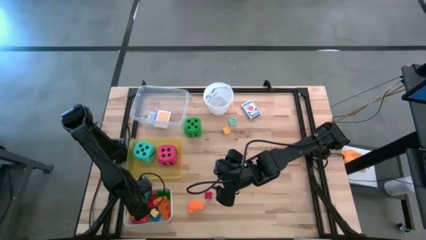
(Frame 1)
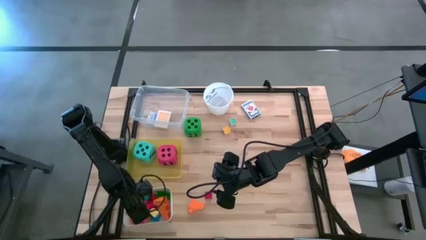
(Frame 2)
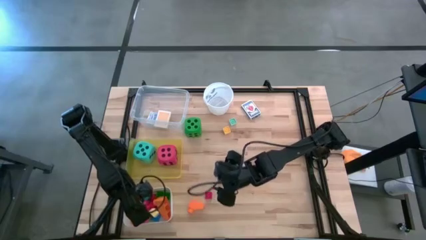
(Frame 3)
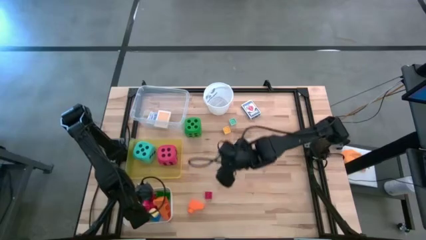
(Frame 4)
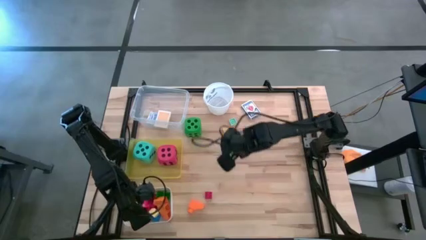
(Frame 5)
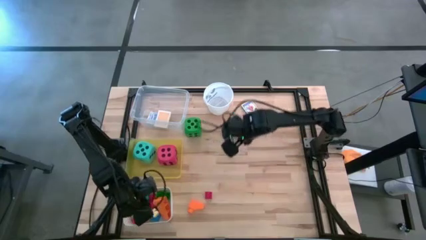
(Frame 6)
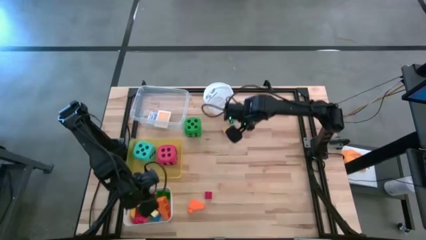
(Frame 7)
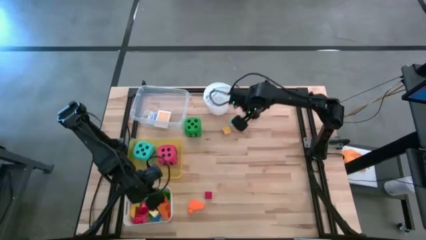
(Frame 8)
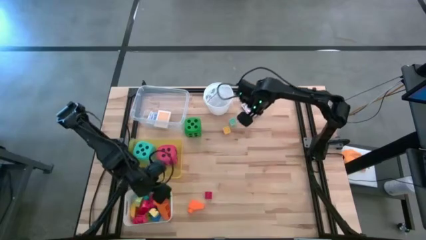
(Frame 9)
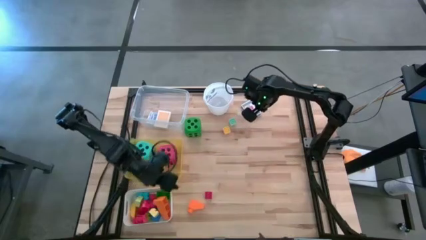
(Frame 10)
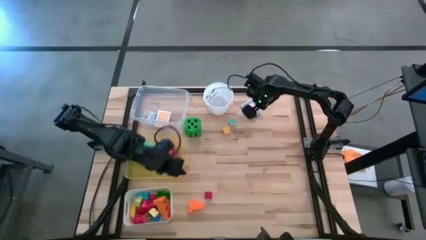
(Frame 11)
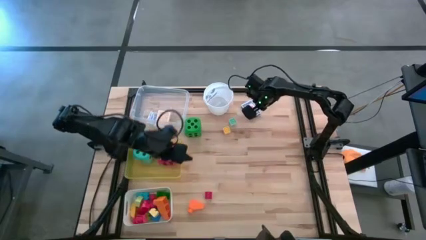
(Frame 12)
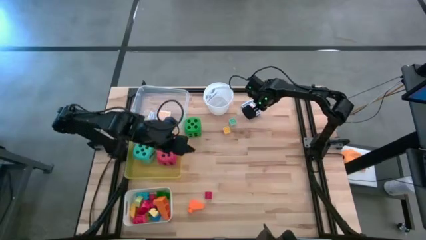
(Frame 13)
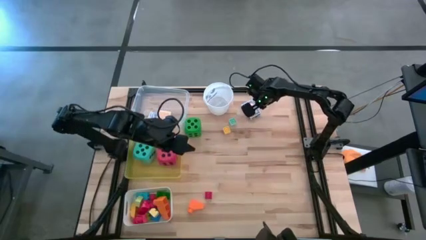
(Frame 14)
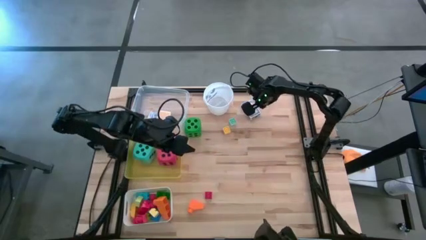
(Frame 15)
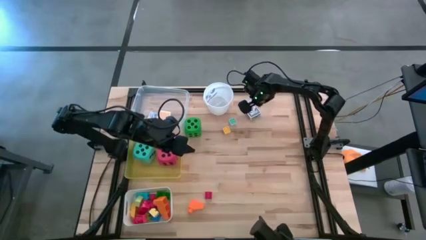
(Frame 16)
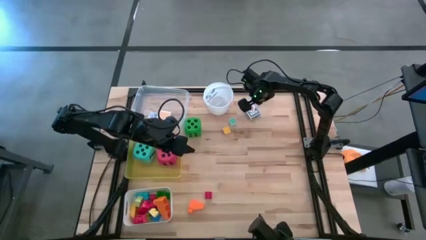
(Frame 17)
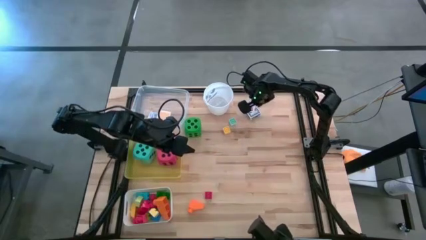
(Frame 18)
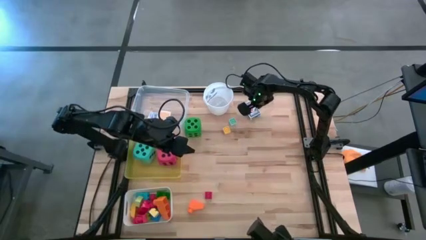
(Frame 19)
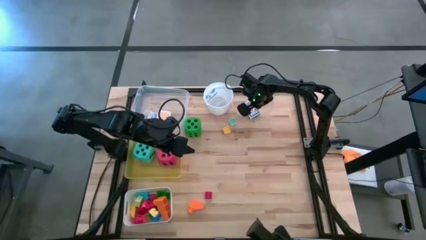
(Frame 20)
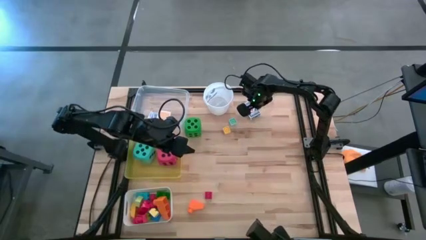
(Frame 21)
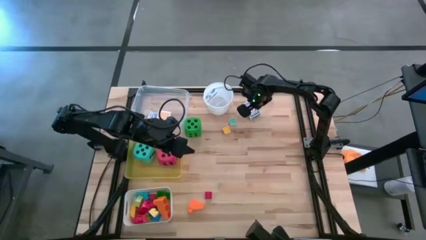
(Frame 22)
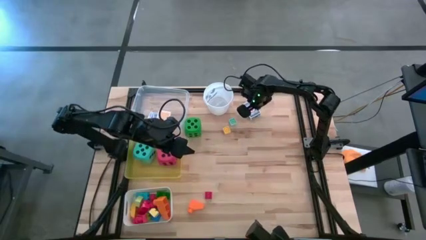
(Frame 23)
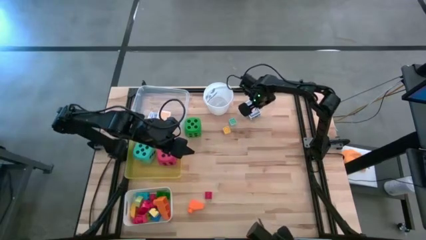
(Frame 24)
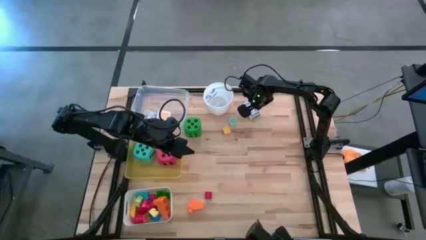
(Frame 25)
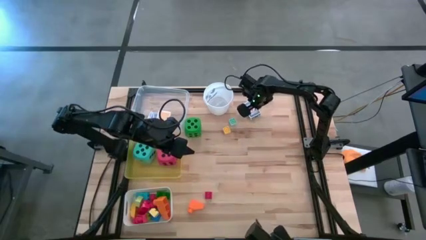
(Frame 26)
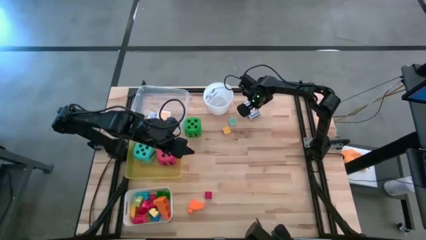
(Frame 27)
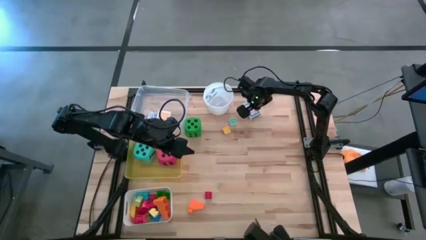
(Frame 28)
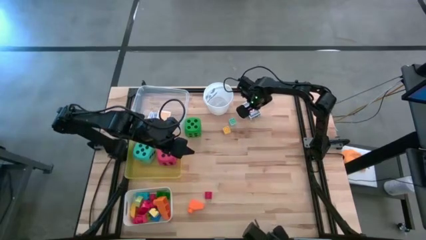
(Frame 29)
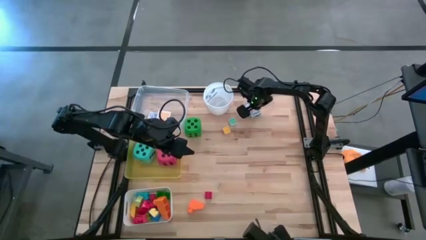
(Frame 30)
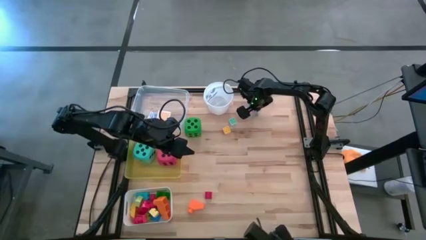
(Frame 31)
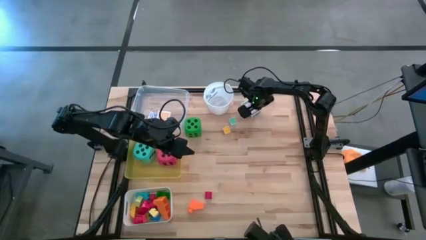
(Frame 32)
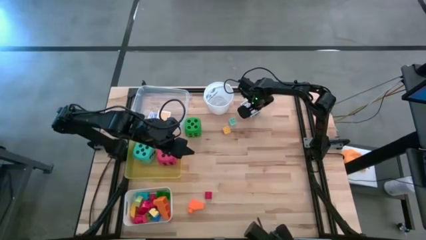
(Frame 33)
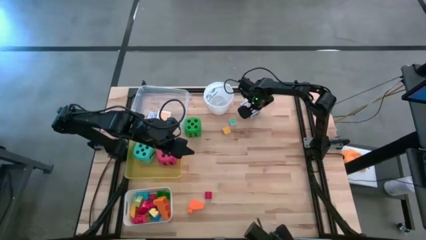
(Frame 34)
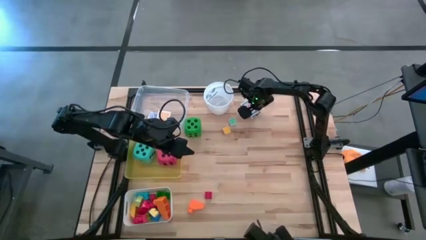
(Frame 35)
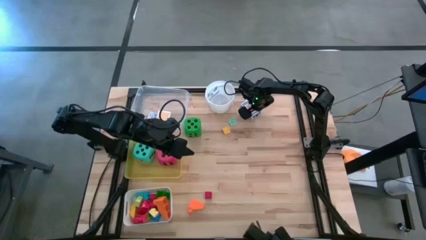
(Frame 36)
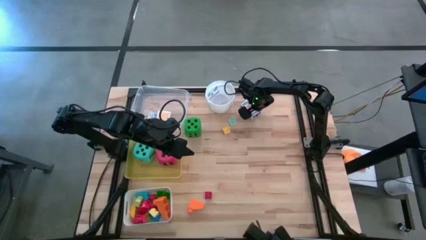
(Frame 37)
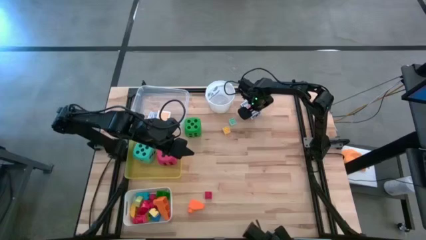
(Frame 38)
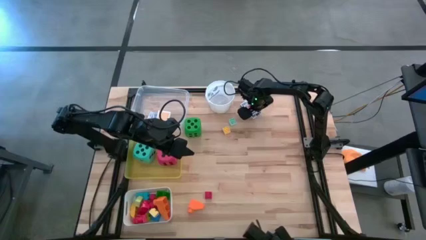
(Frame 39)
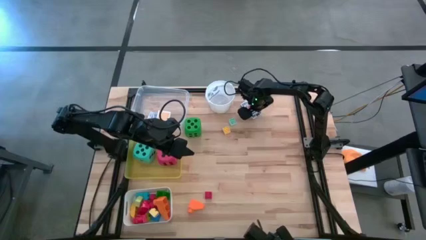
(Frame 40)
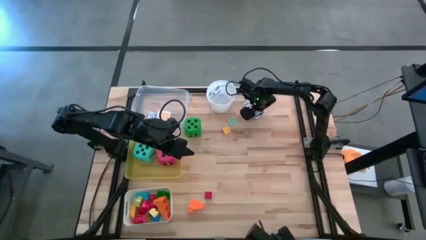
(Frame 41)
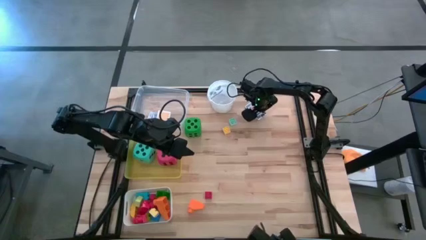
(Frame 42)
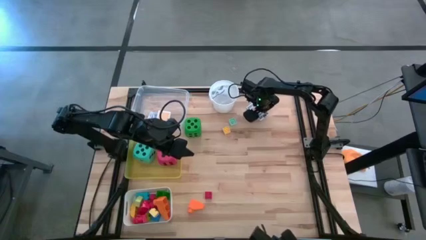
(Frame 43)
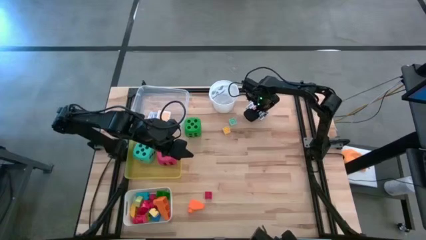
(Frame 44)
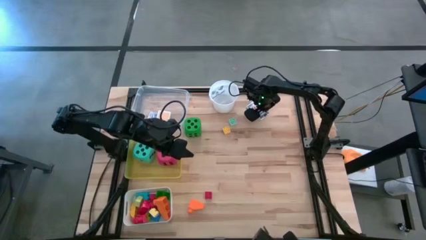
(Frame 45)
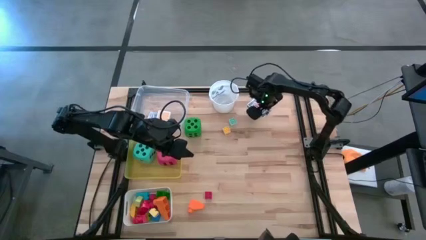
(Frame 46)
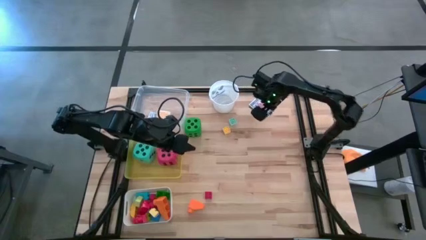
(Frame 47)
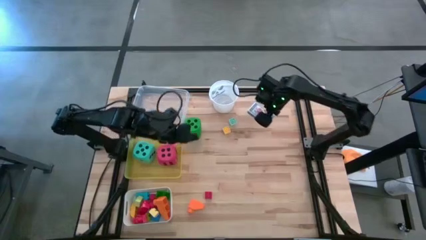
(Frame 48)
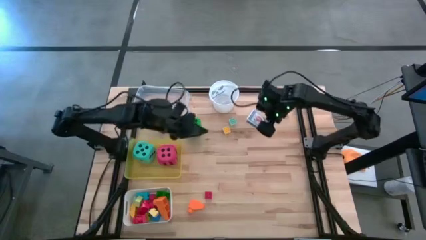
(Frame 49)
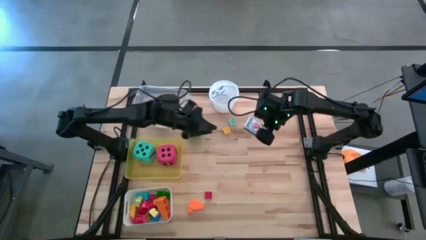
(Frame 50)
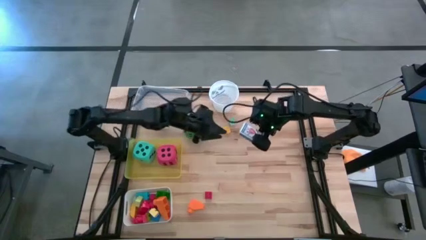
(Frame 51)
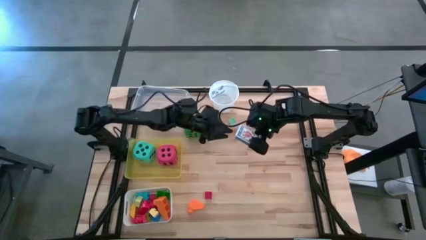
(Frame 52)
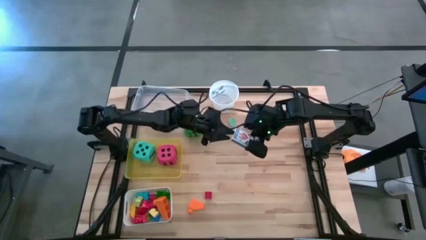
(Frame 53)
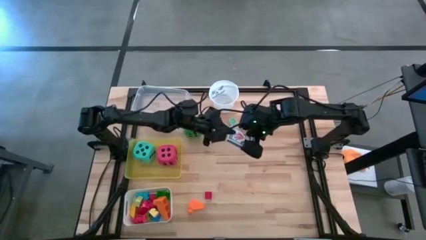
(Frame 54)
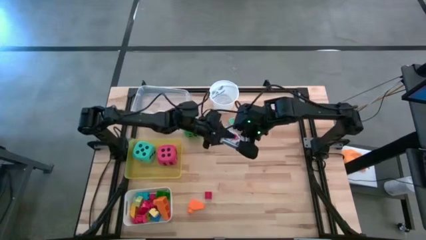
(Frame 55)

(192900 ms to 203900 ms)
Task: Pick & Place Toys
Put the red deck of cards into the transparent bin

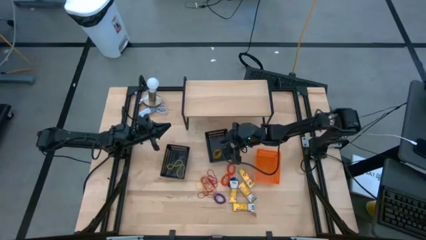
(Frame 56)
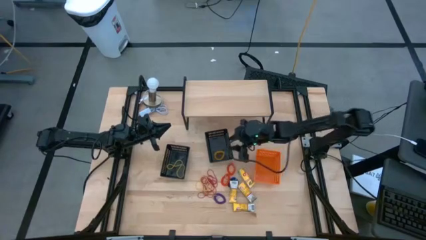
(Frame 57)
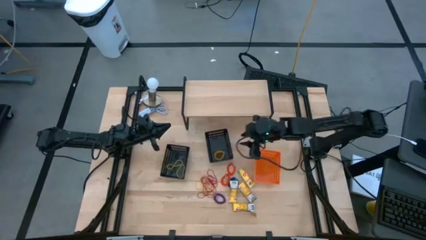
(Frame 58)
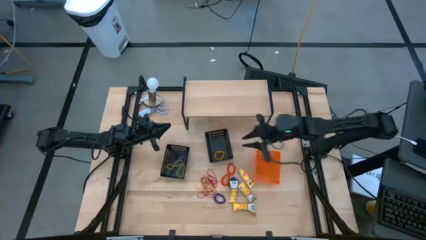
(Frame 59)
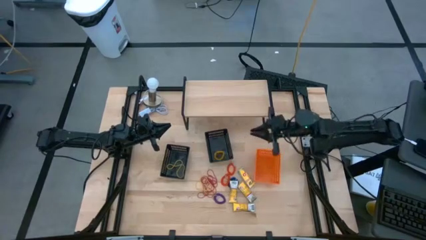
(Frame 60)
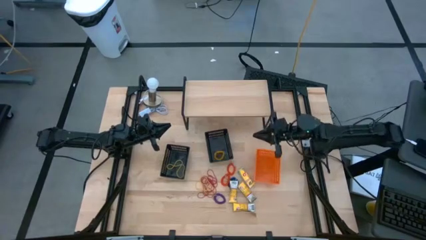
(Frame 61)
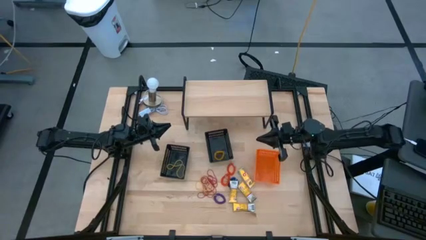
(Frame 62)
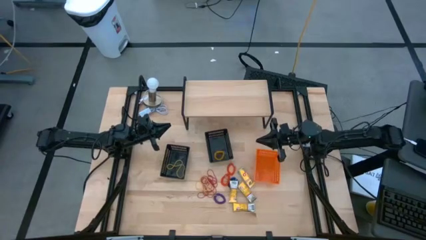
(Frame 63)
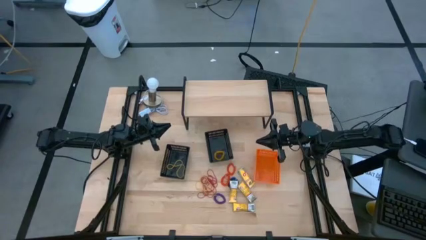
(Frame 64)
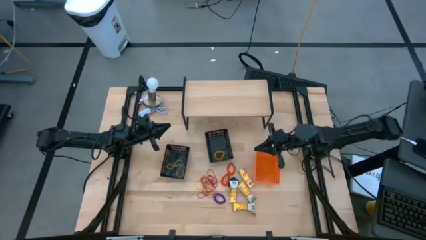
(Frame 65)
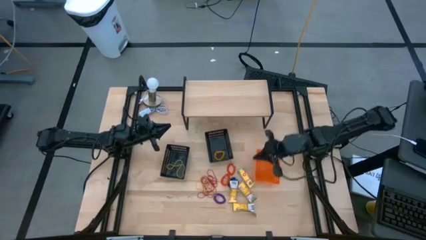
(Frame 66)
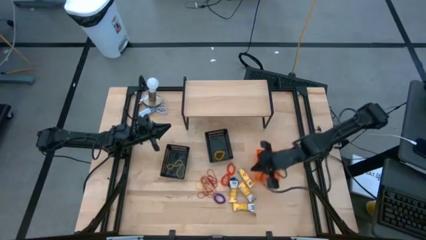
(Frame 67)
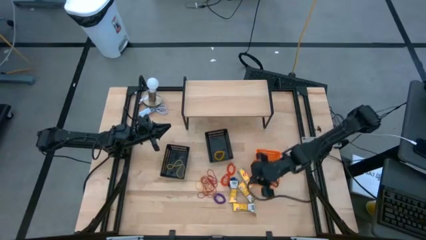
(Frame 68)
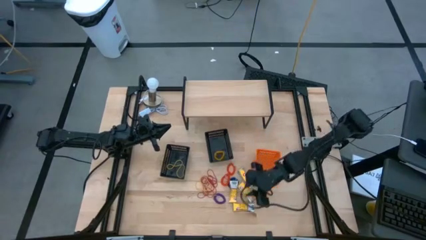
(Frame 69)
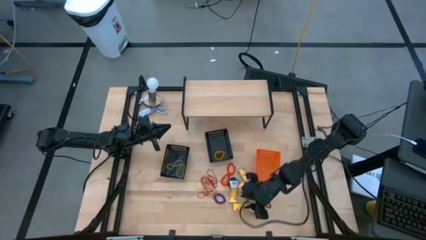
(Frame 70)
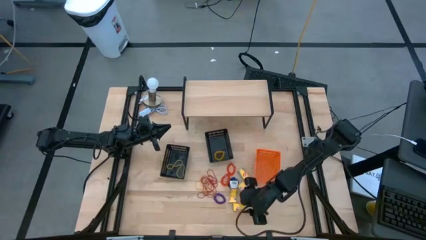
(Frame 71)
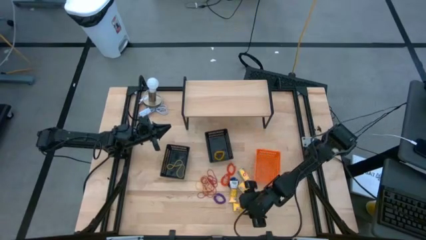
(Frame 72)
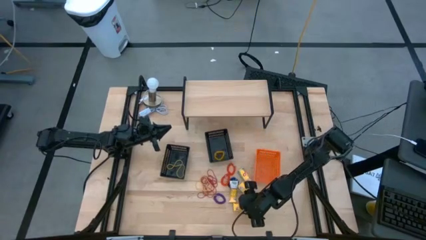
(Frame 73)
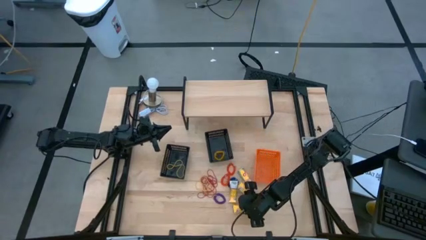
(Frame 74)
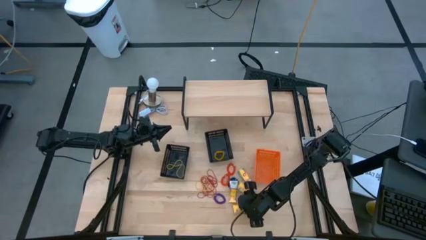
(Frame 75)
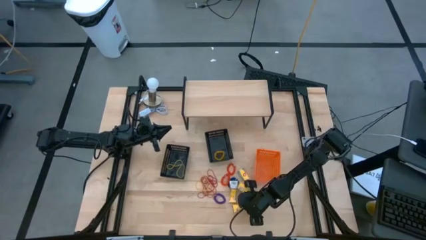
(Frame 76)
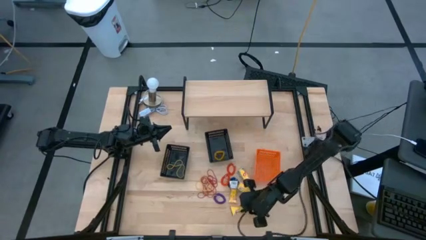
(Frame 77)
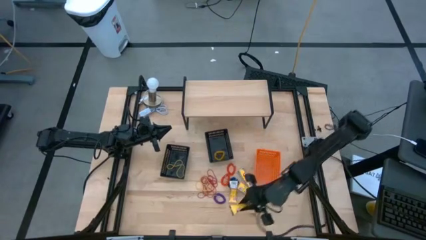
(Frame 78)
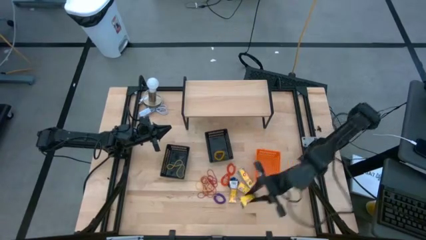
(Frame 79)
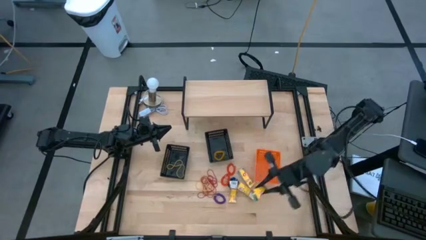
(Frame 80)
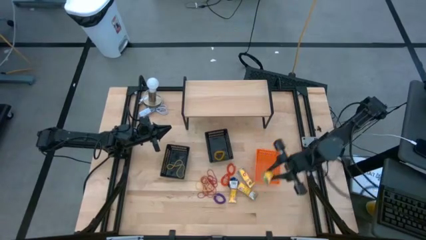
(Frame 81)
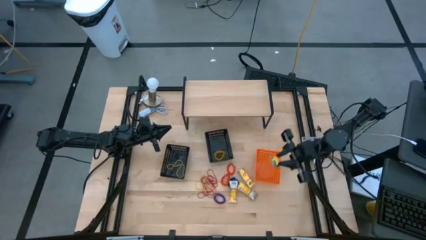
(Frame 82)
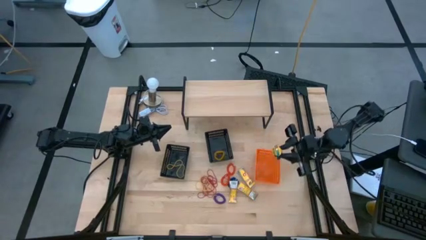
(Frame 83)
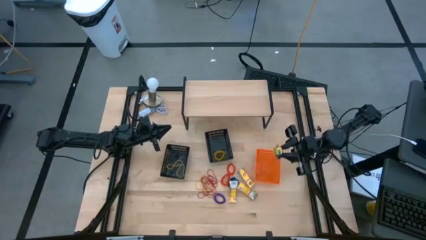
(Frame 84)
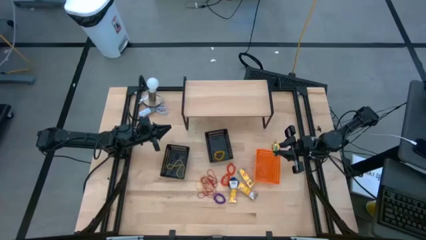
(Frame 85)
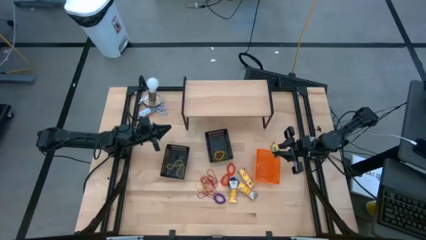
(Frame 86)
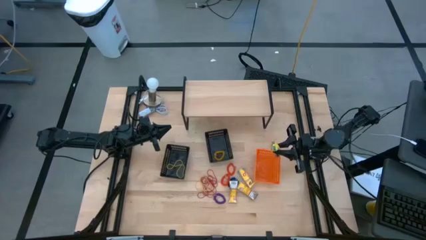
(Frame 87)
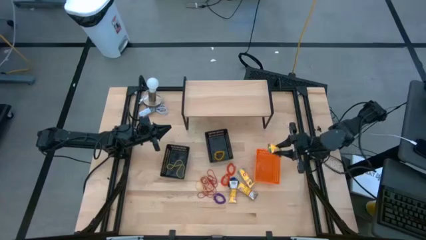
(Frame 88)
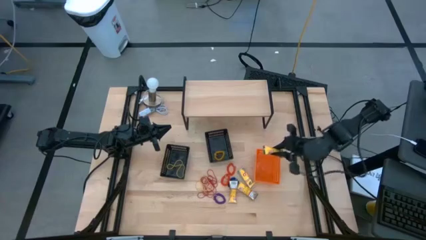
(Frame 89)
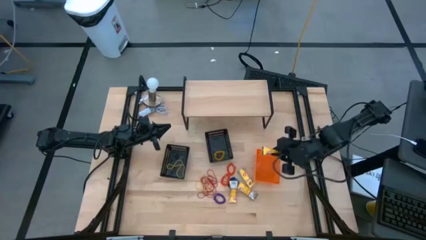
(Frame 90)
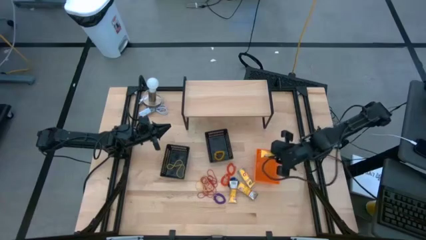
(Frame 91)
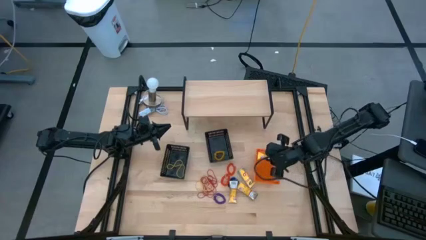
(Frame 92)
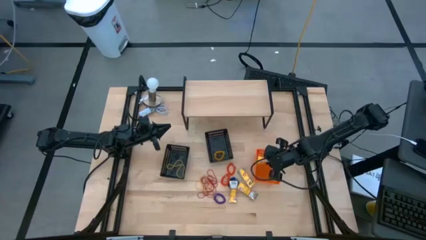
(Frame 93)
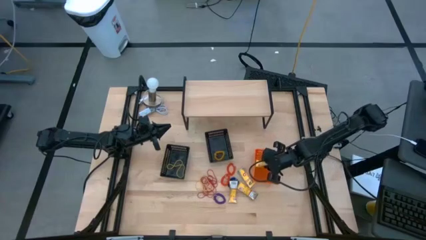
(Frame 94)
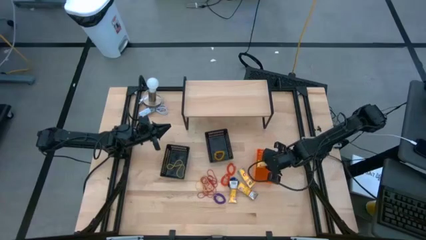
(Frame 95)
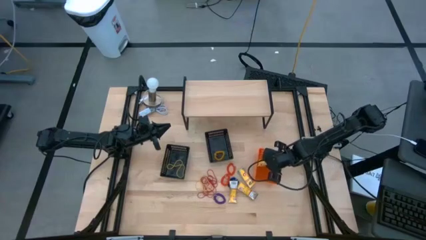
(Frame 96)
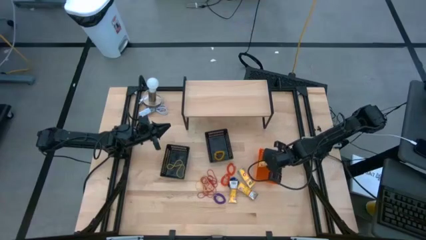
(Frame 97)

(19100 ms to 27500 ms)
Task: Pick & Place Office Desk Supplies
Put the yellow crayon box into the orange bin
